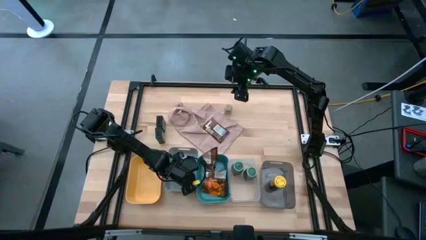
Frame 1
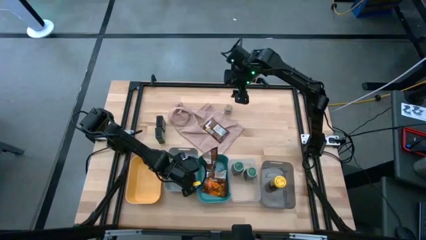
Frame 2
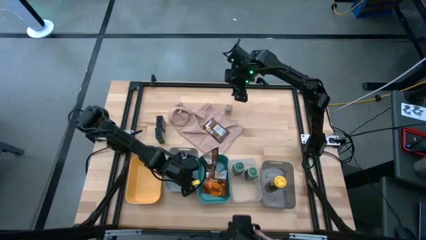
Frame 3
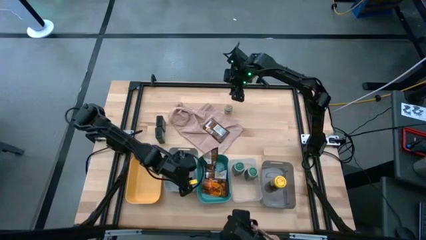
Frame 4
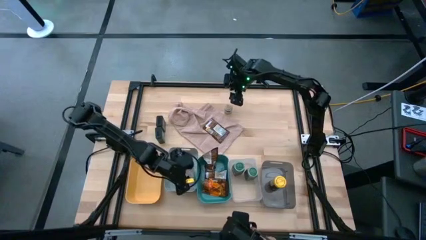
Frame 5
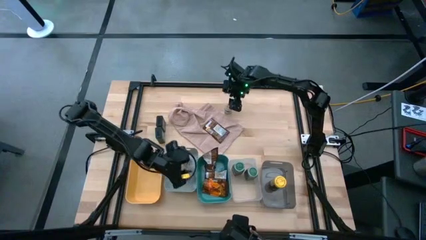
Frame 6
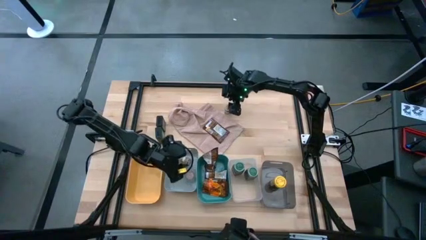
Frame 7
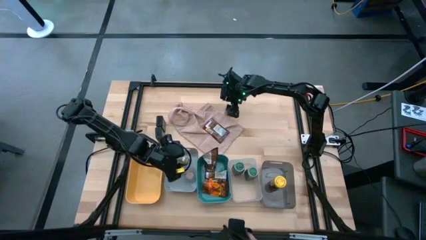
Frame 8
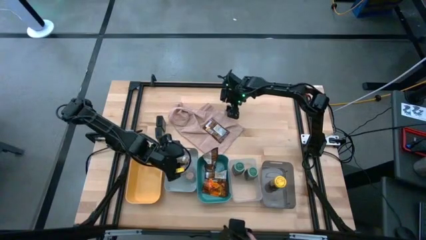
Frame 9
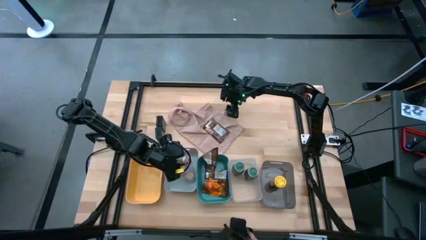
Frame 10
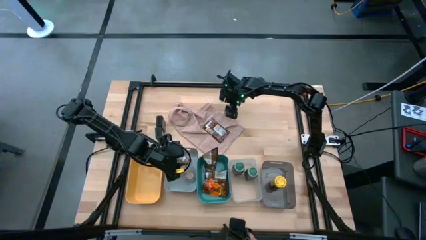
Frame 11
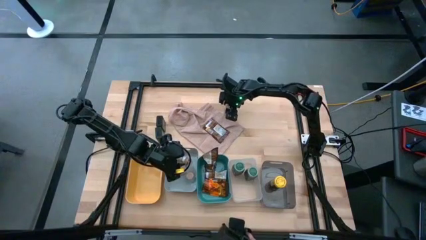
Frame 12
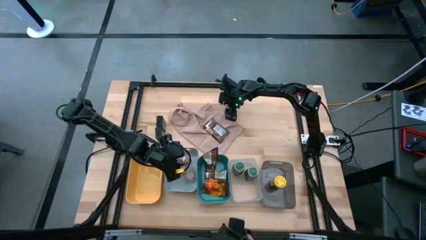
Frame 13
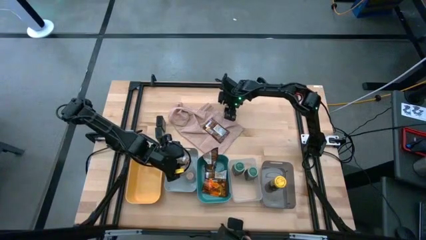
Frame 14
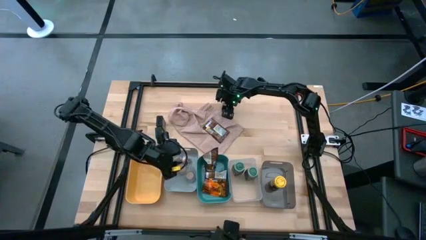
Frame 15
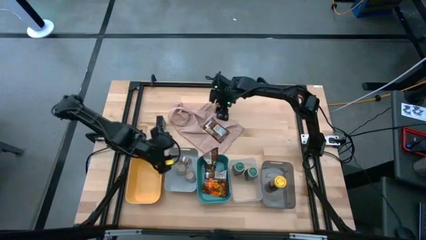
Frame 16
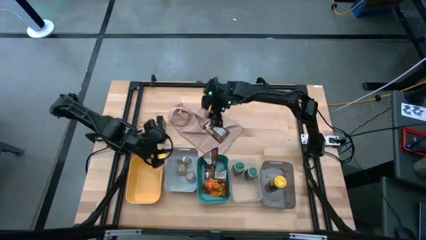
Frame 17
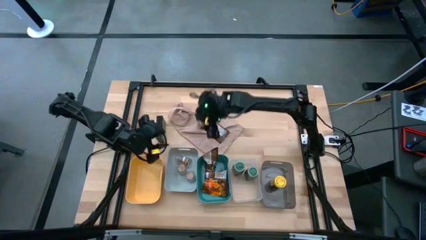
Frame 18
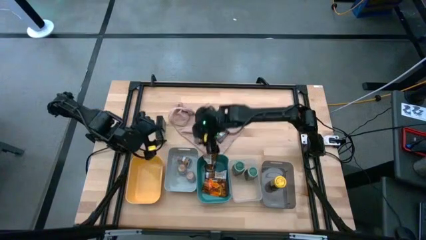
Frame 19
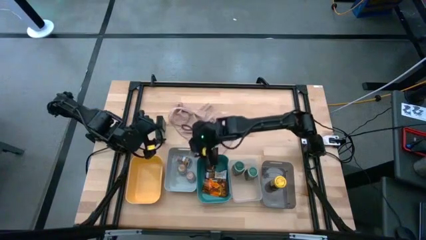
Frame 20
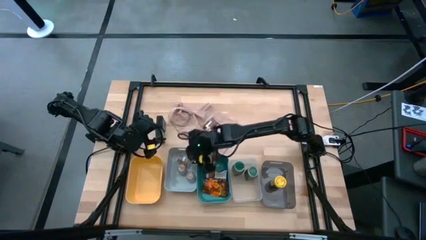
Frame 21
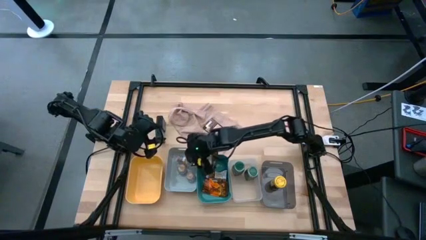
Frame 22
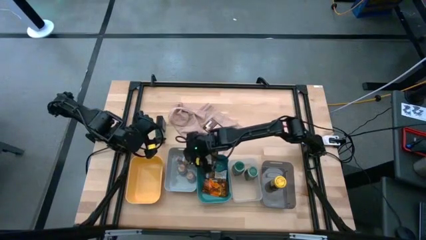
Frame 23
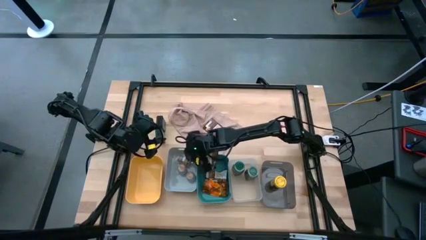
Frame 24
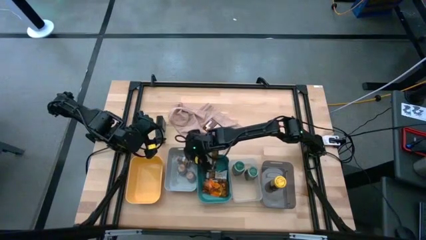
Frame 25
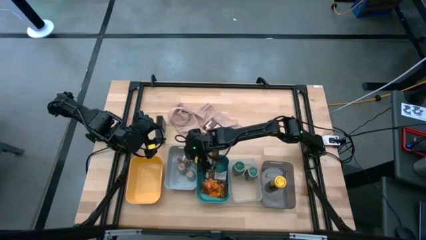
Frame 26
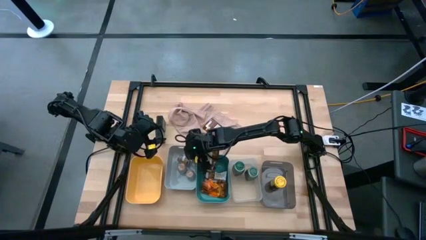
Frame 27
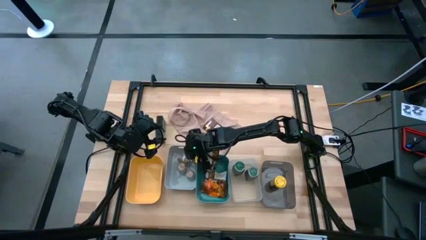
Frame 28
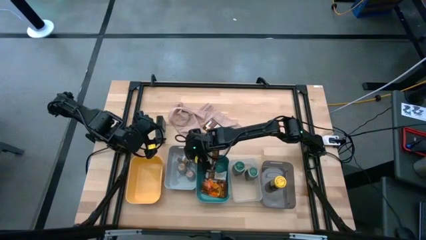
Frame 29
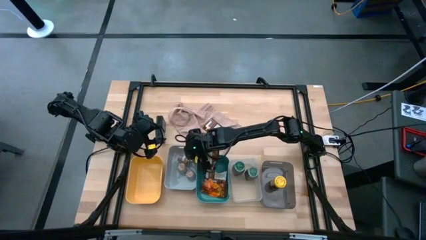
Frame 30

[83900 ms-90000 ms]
Task: Sort spices by type
Put the brown seasoning bottle into the gray bin

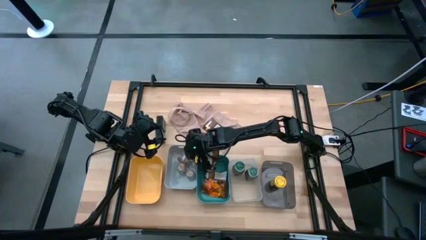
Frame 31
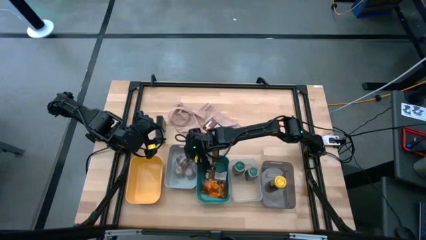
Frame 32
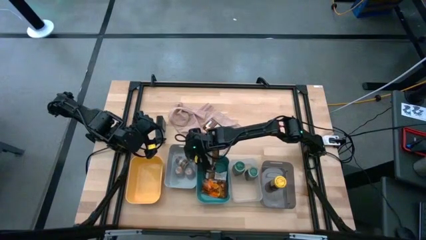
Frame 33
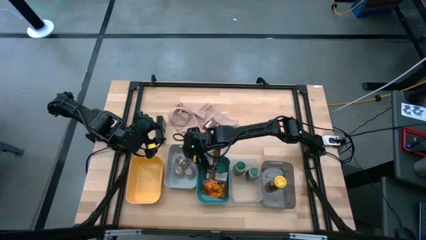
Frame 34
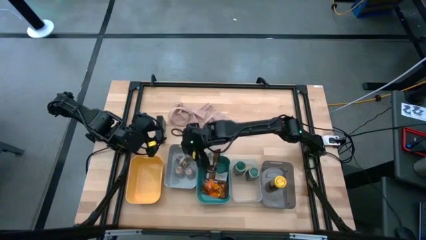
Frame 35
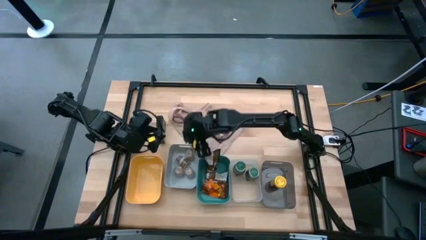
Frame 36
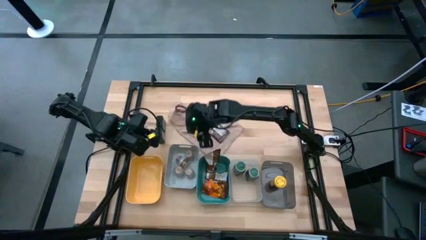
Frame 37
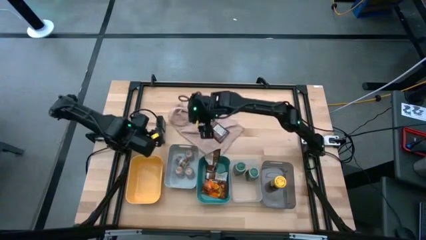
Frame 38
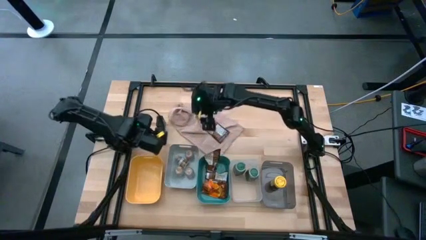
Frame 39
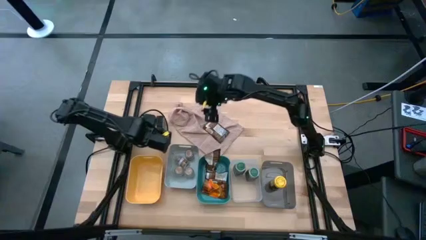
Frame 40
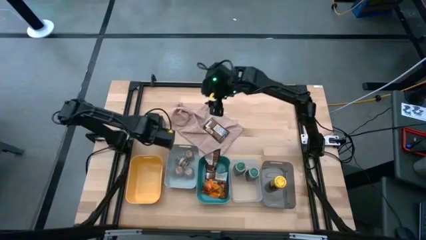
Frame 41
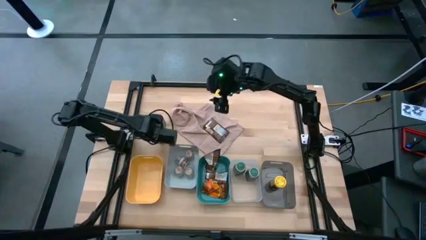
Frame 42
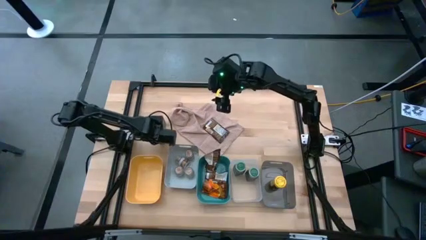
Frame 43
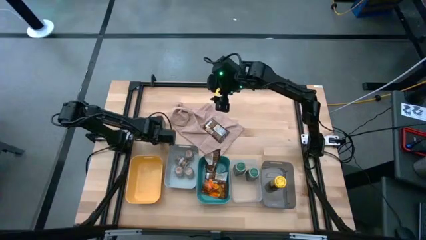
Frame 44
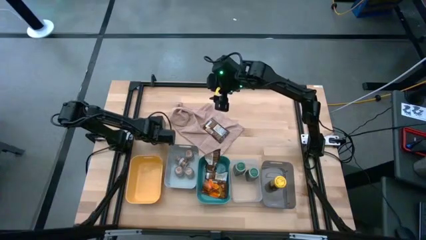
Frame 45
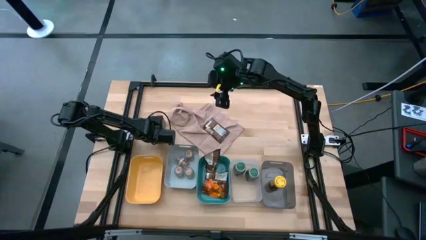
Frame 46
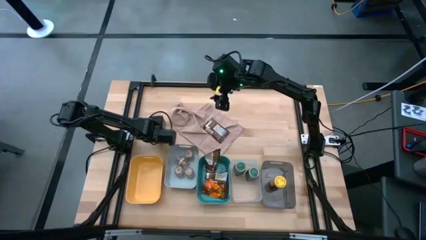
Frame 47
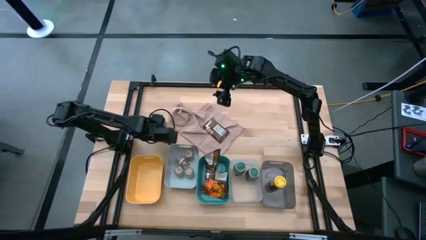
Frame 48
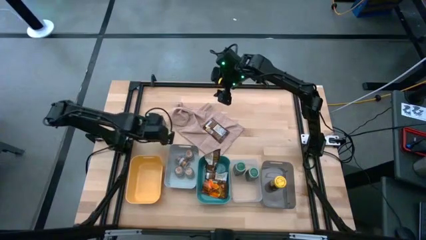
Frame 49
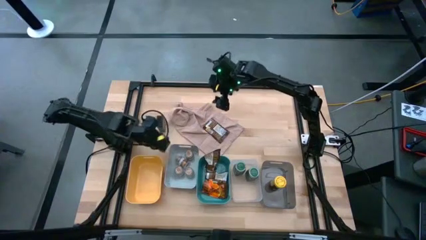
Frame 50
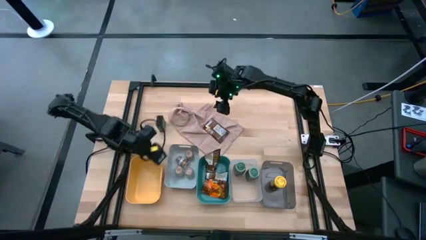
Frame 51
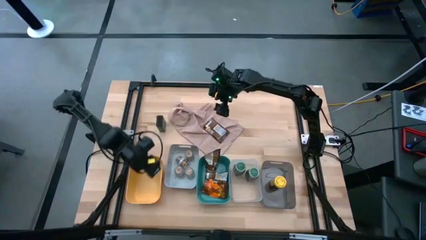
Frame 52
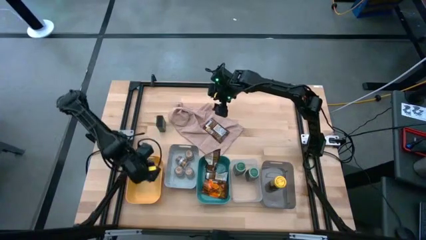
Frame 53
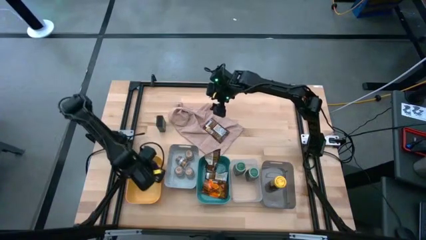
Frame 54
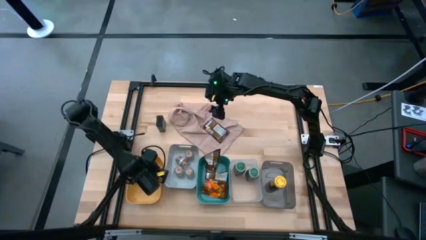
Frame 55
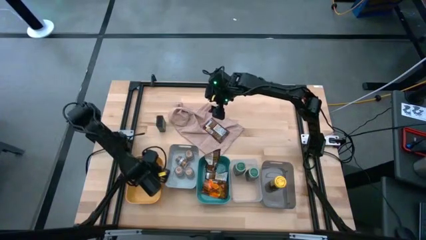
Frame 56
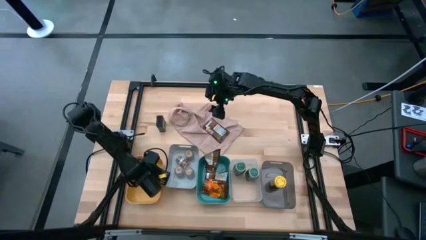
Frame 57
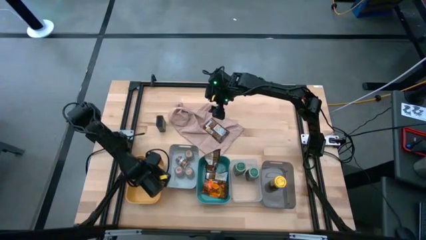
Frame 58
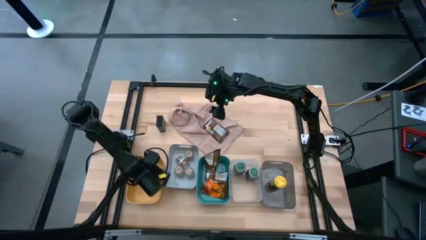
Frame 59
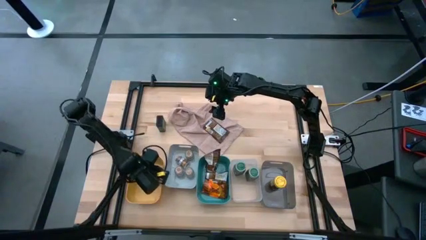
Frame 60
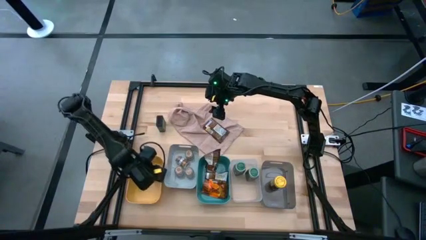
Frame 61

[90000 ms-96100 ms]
Put the black seasoning can into the yellow bin

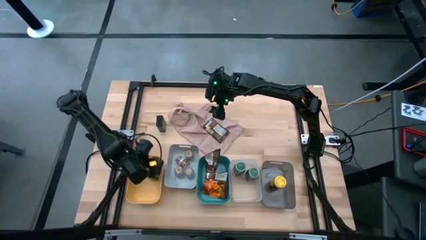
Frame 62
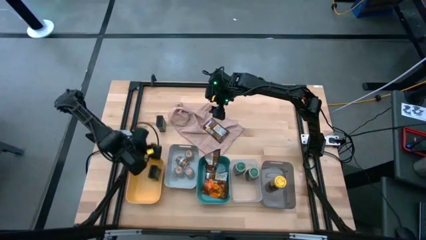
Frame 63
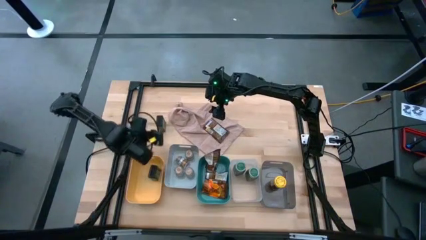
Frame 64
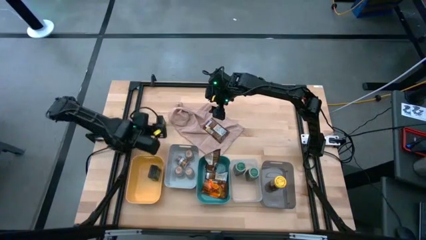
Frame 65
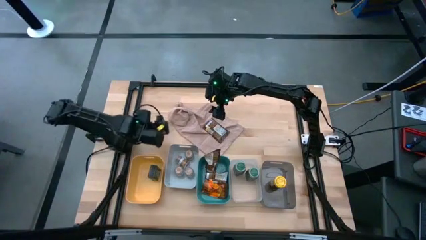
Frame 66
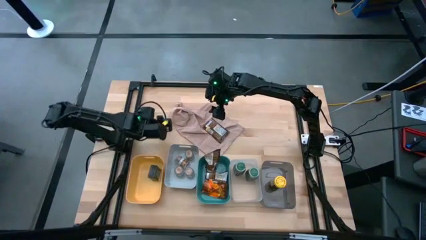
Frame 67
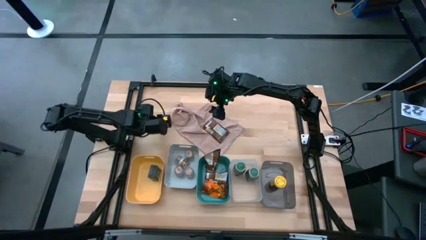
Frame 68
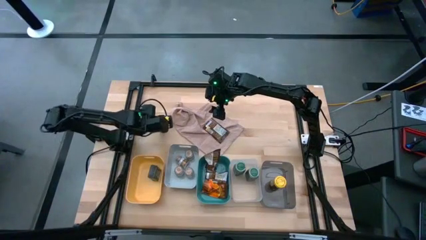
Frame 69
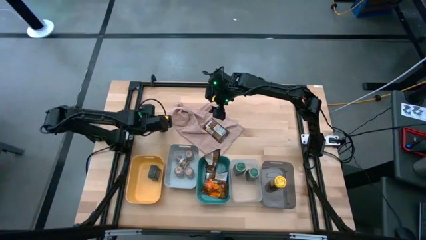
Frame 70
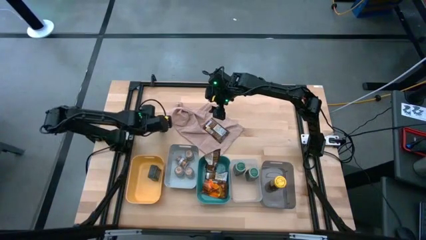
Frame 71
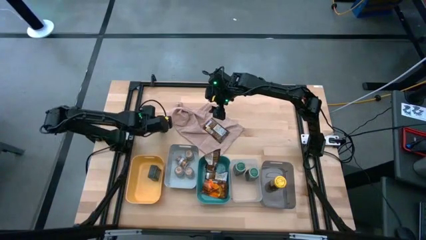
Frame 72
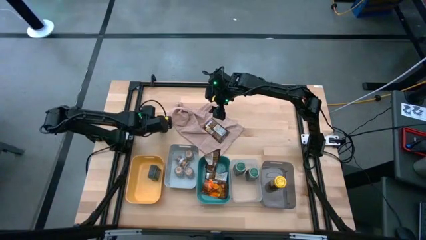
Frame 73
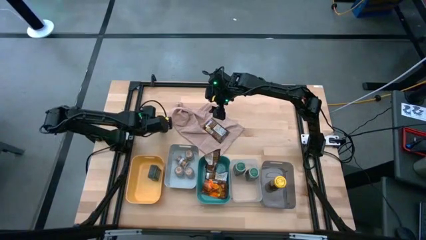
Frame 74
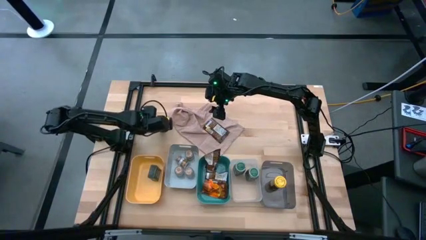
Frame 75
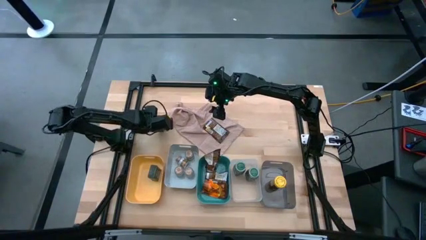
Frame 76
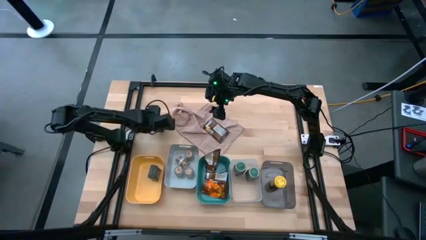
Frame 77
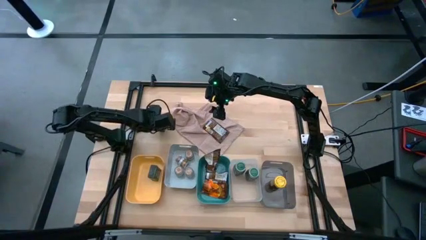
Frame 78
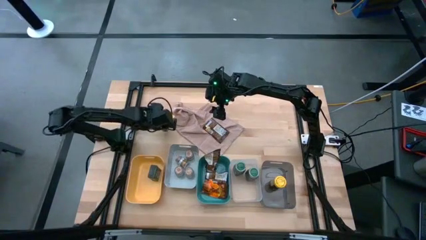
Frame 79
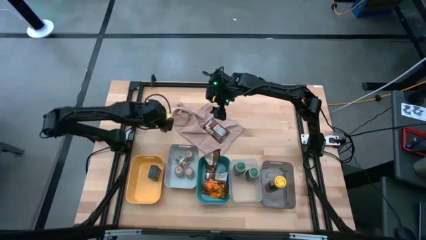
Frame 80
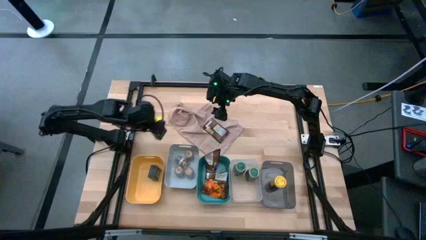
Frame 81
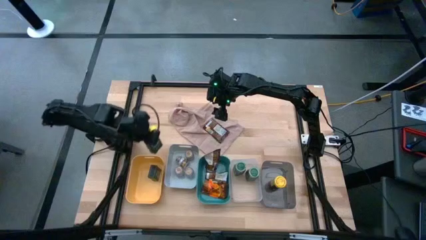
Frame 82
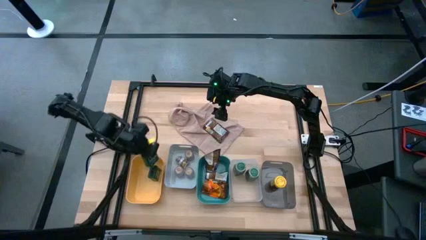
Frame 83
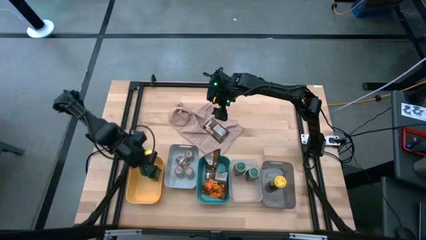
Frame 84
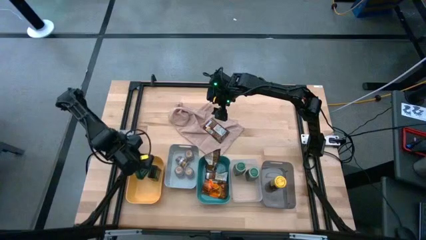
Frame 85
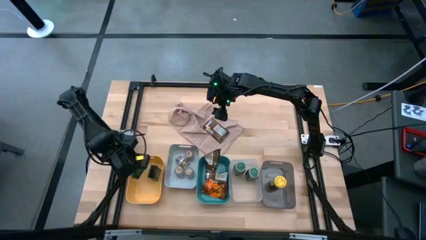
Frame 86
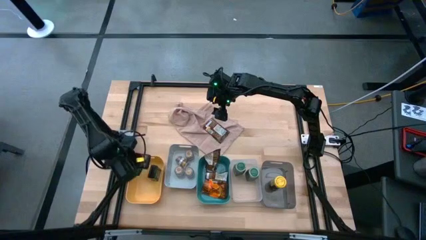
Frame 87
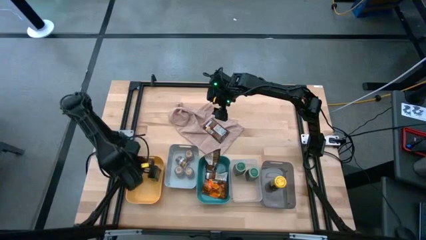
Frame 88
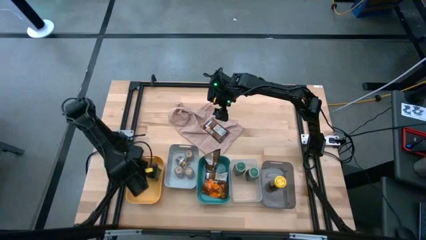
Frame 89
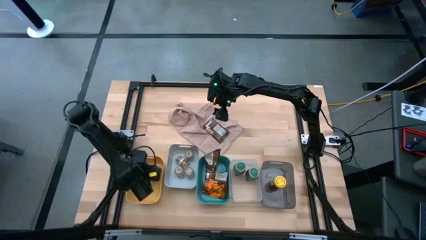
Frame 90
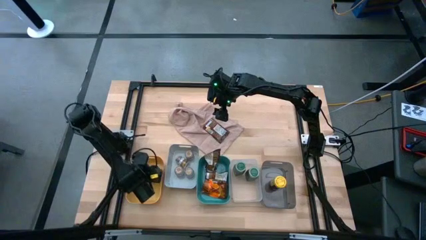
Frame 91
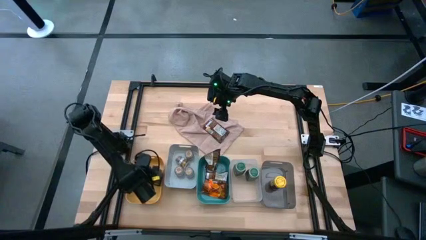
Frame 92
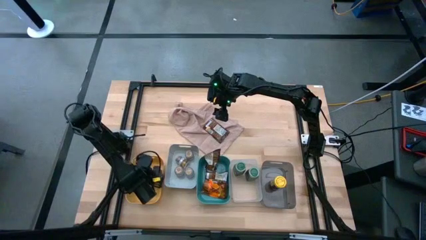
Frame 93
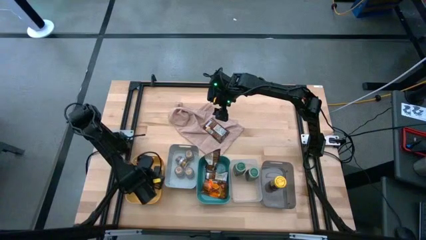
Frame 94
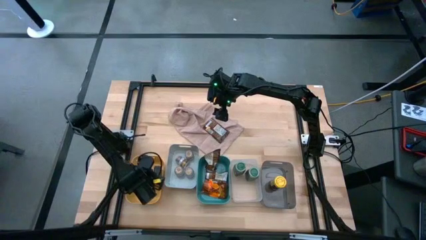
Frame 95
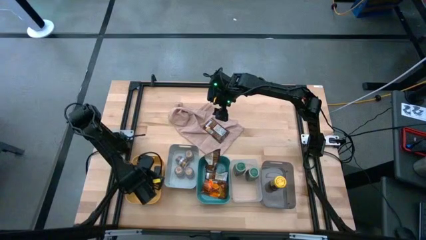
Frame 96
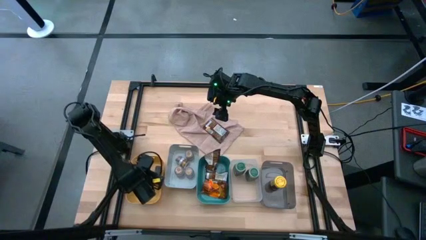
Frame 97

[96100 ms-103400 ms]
Put the black seasoning can into the yellow bin
